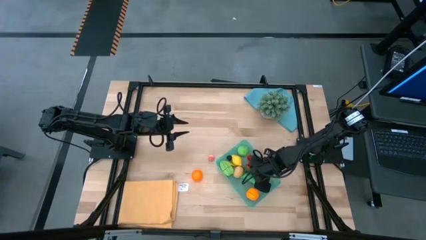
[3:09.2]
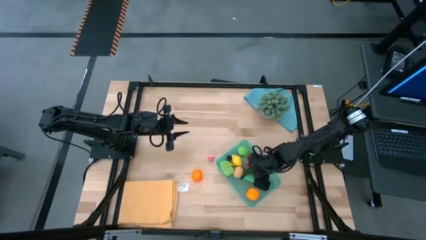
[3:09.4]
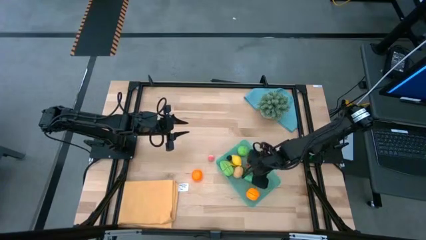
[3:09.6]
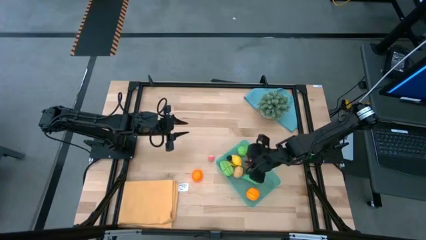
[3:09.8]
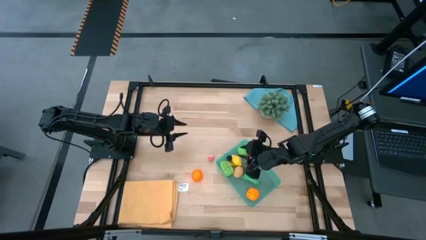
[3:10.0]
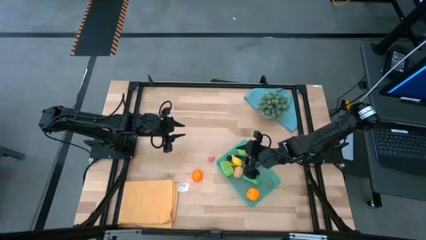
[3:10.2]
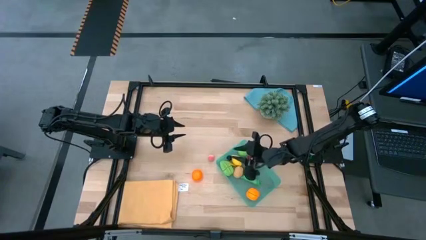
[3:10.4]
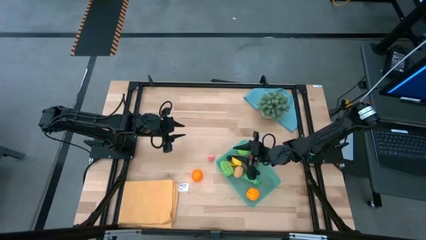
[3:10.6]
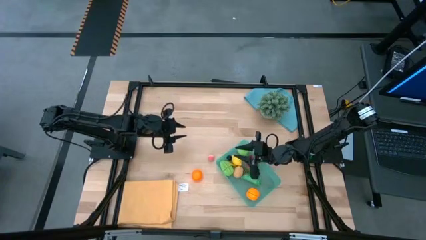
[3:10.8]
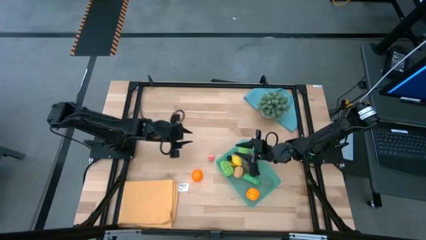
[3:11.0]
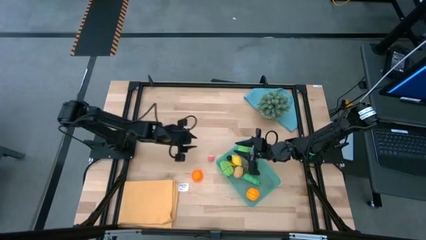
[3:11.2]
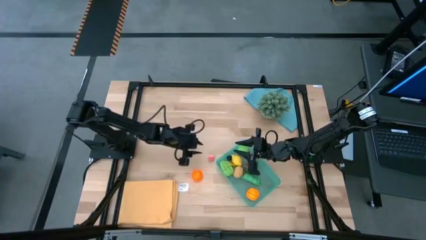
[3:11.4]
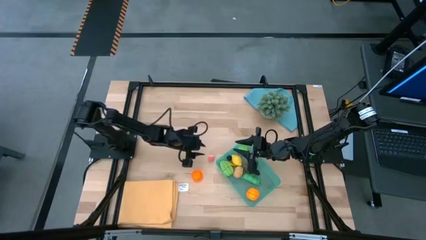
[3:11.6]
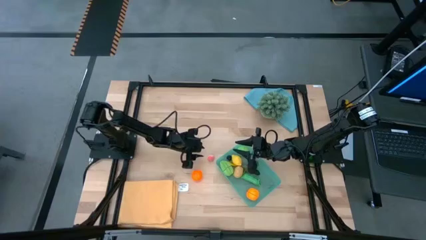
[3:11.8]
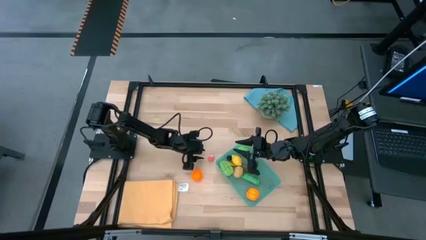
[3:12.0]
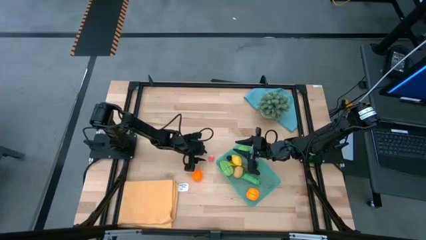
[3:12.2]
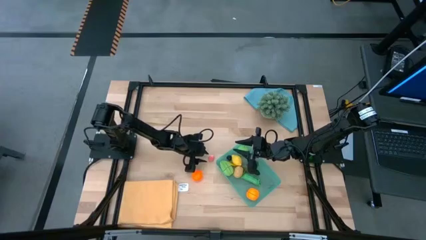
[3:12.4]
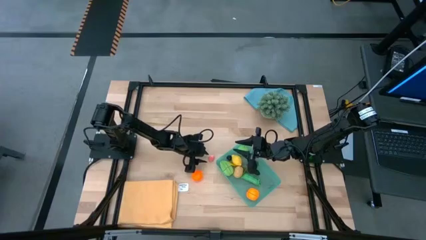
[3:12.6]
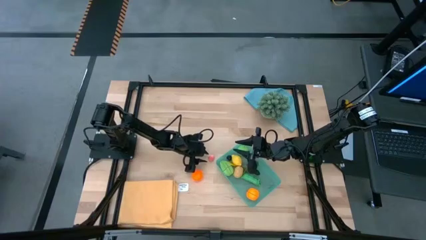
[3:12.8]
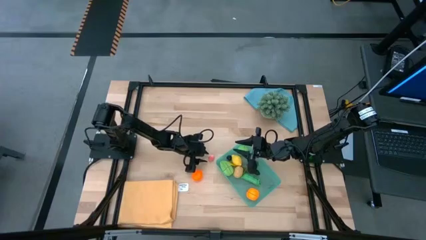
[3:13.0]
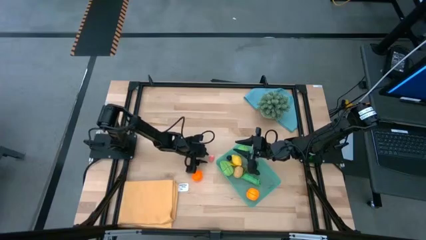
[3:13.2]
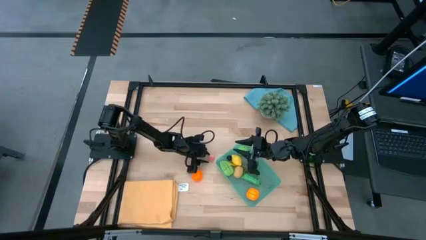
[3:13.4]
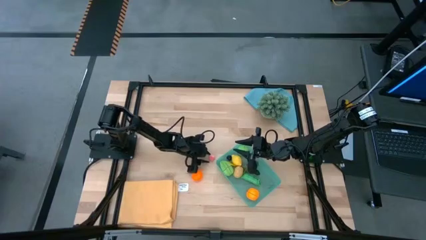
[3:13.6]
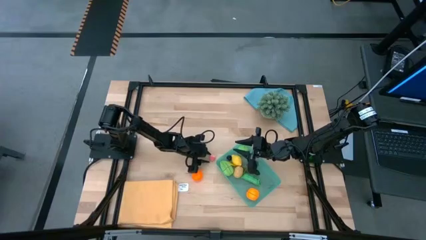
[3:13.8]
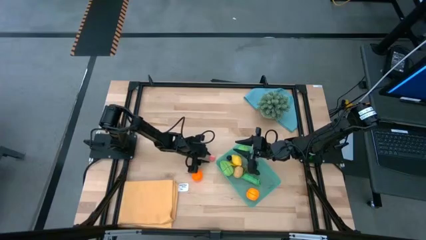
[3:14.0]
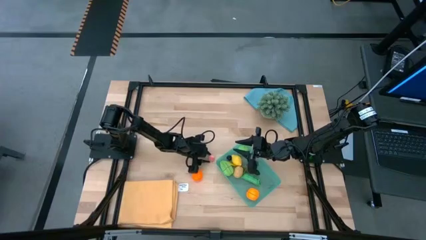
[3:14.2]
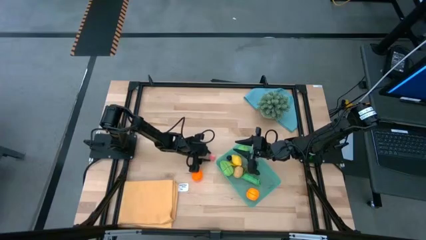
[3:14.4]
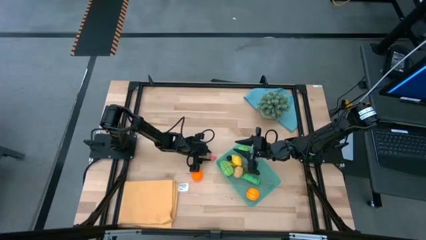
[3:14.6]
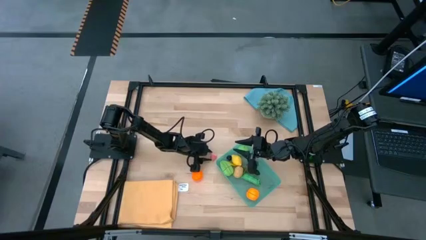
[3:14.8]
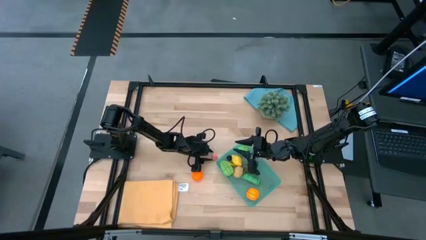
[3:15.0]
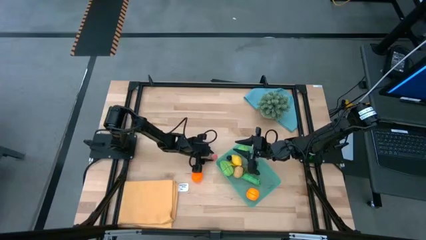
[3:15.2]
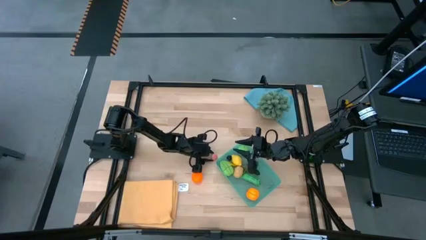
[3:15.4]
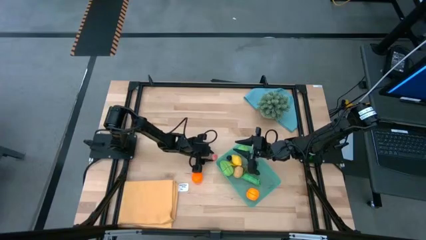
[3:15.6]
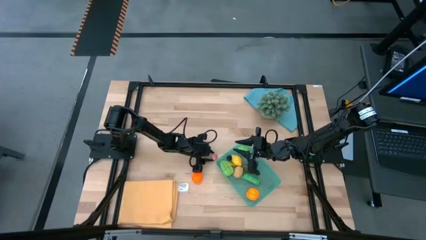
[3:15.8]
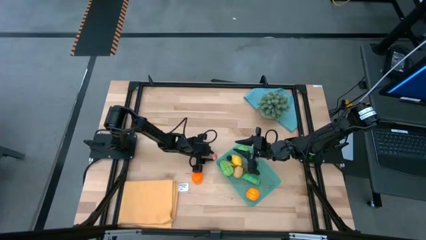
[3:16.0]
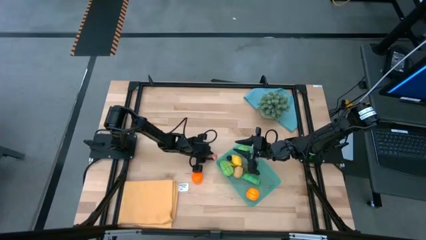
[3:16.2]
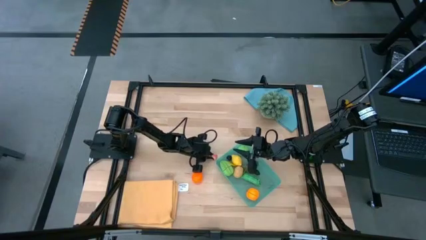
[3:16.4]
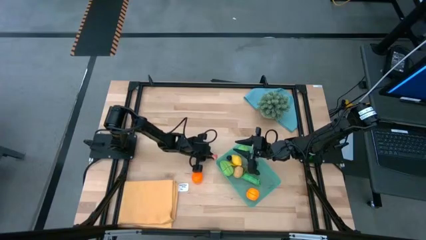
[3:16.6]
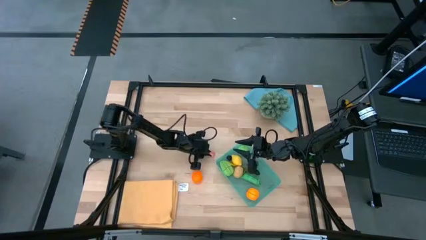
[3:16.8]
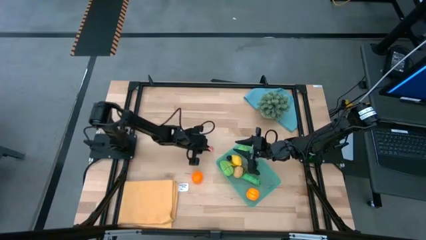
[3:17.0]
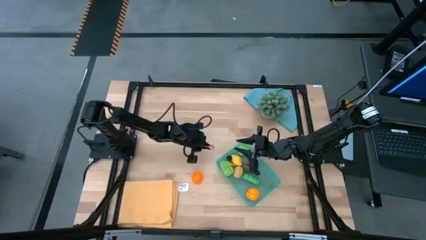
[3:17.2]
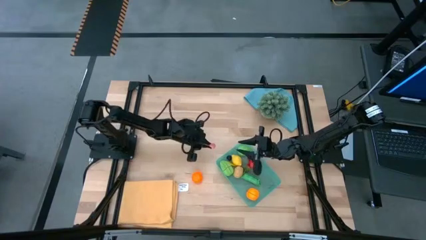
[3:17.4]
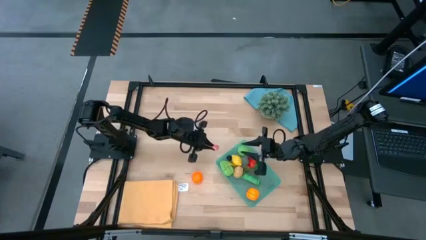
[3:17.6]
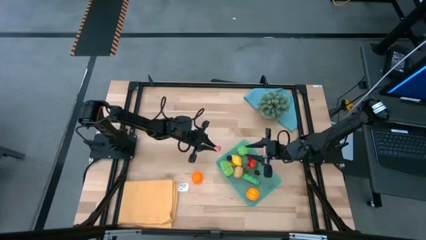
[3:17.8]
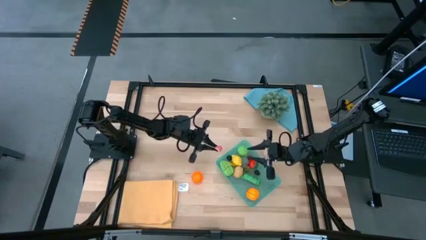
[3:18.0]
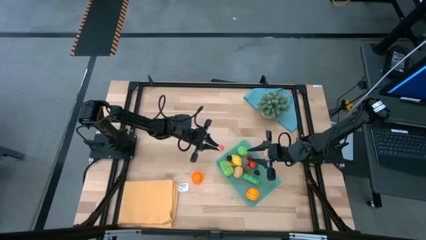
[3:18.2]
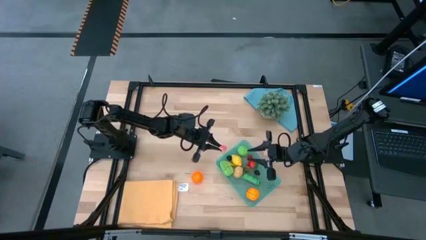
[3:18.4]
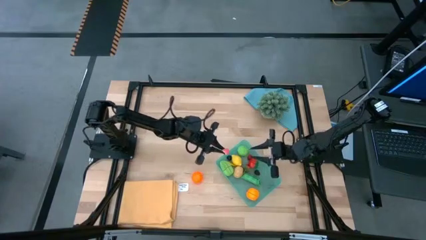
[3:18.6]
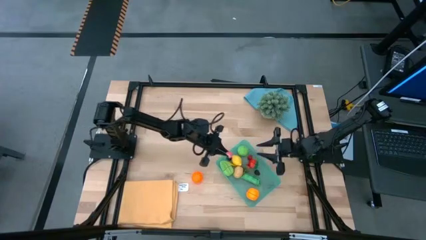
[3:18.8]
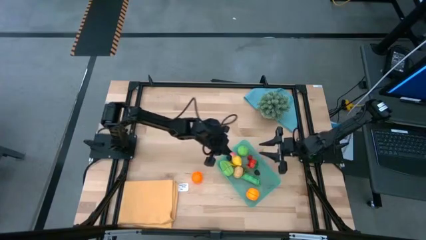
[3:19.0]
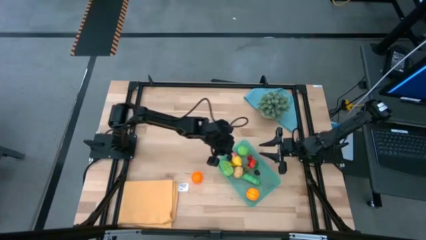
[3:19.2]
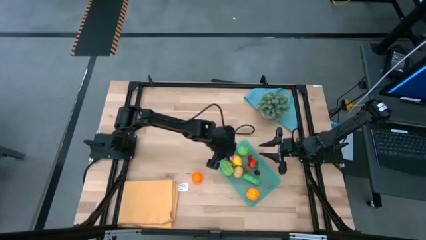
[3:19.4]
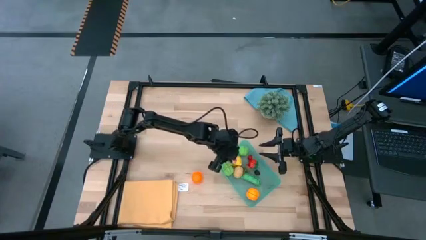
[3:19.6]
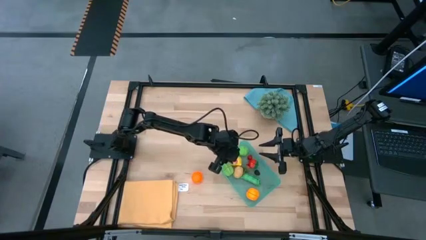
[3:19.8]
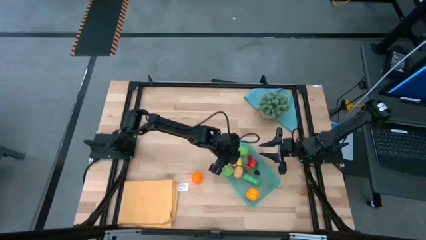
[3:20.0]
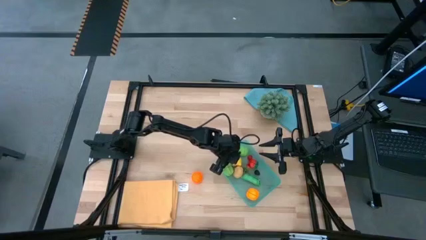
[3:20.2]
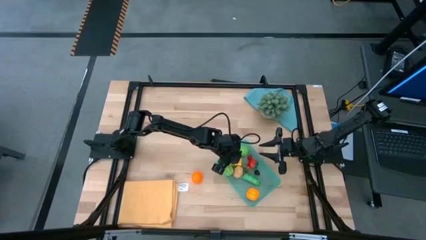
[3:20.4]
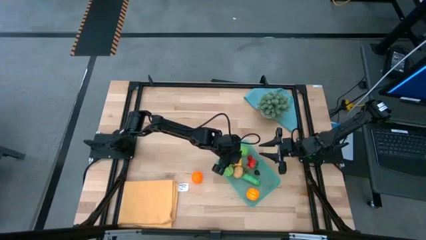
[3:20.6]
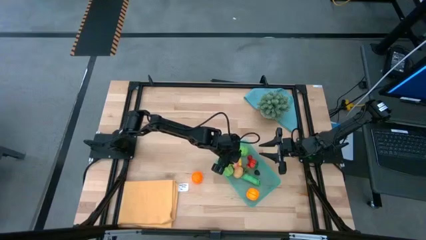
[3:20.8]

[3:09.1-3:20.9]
Task: Pick and placing Produce into tupperware
Put the apricot into the green bin

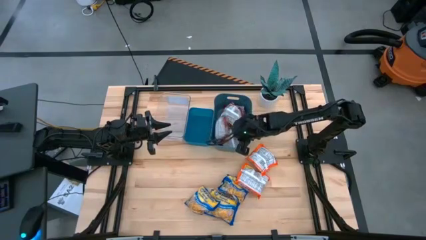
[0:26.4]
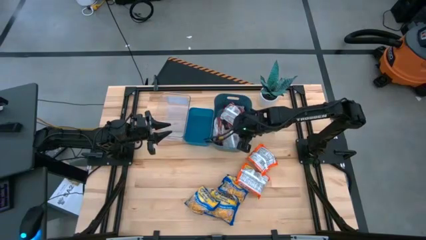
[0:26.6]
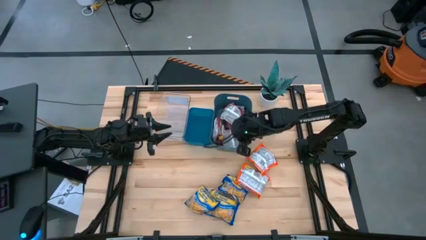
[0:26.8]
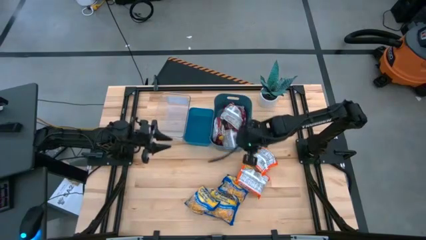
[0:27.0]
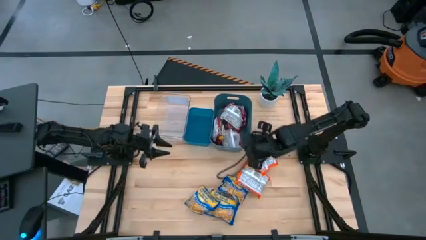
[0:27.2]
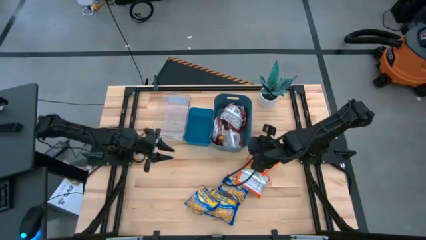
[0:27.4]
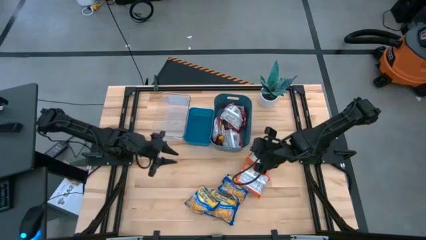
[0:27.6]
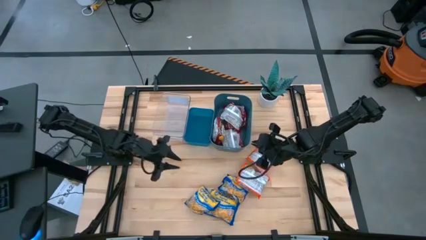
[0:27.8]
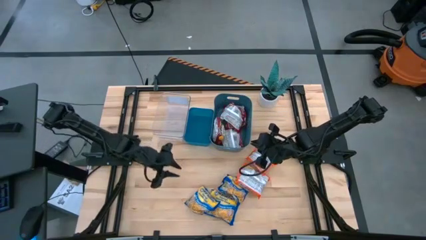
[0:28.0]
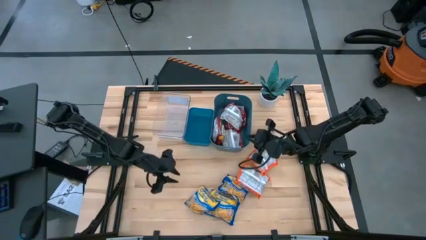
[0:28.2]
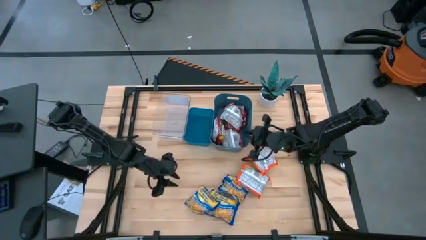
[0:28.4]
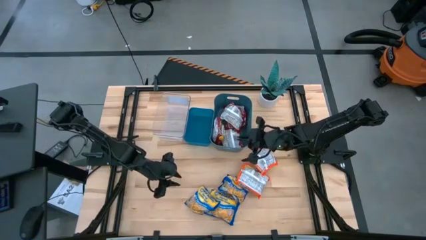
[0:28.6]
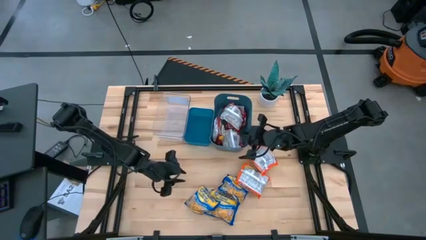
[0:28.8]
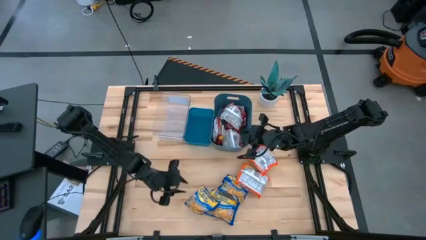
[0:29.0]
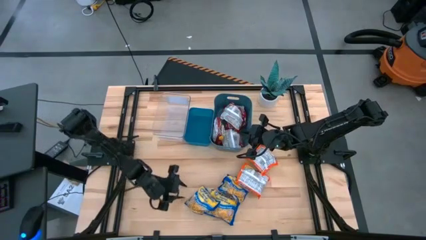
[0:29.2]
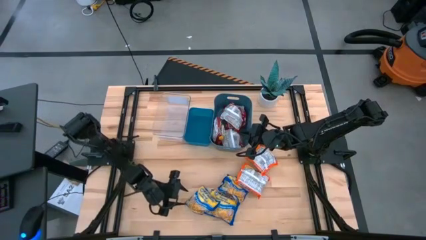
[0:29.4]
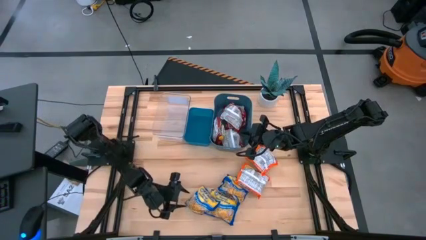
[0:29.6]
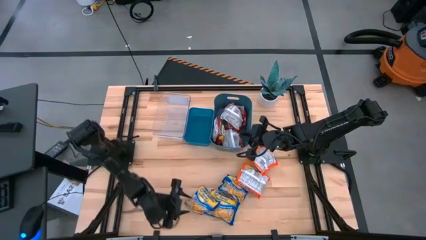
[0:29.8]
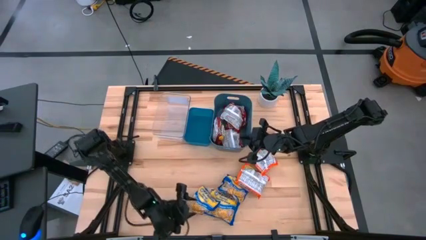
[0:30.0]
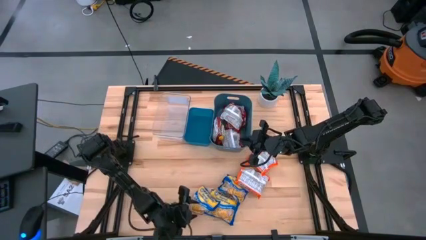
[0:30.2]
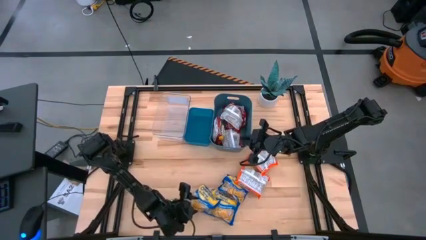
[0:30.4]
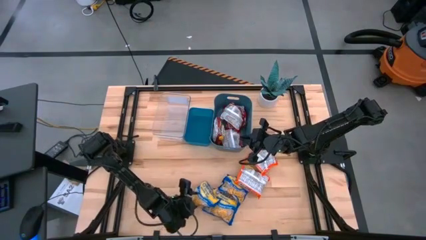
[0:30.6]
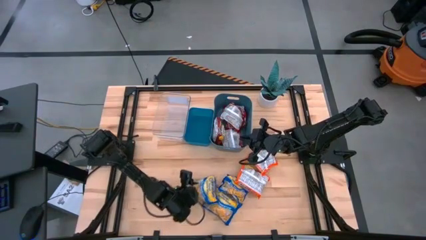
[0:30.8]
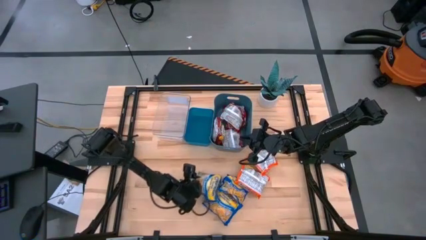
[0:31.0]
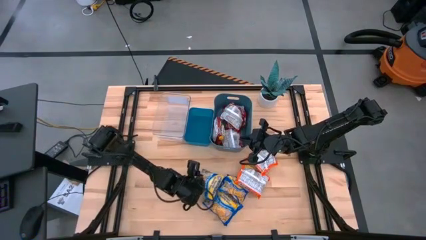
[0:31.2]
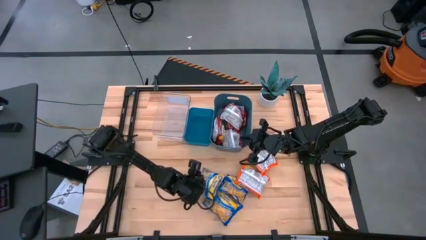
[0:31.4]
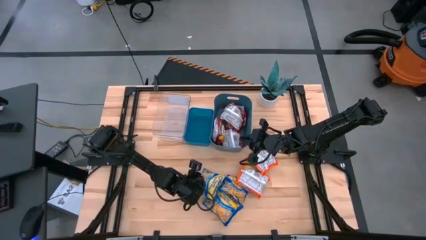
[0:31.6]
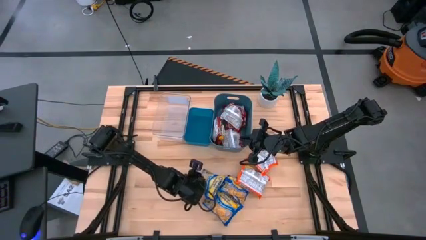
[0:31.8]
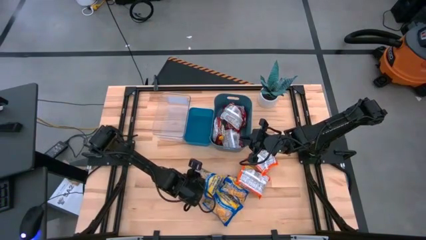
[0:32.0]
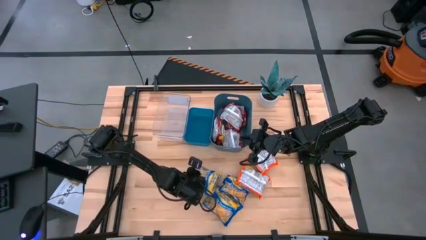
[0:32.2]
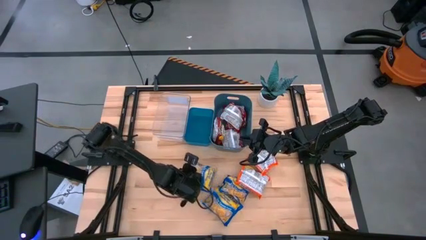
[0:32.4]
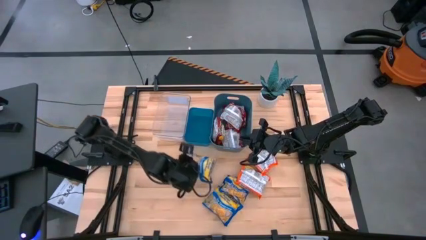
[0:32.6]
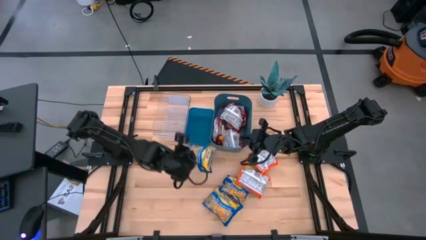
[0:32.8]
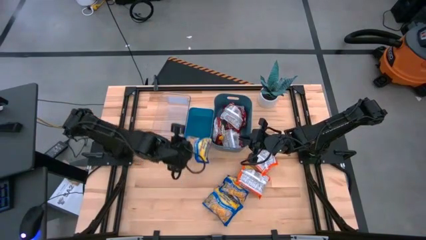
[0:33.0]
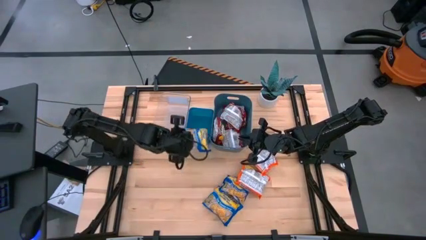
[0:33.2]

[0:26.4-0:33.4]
Task: Sort Maruchan noodles
Put the blue noodle pack into the blue bin
